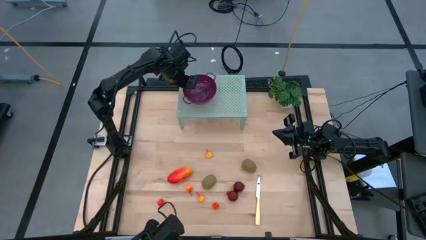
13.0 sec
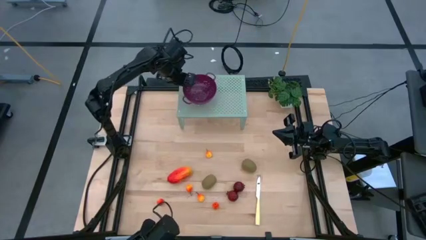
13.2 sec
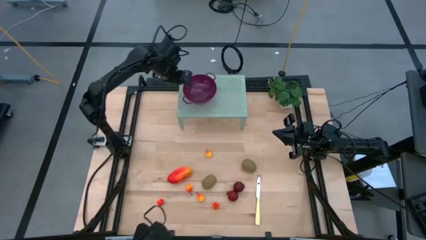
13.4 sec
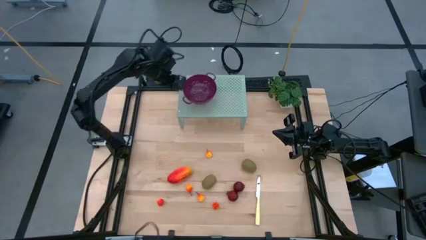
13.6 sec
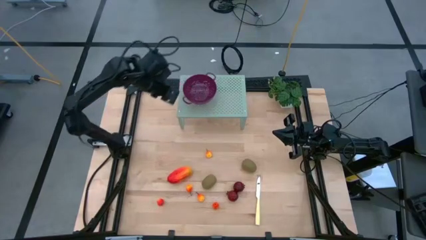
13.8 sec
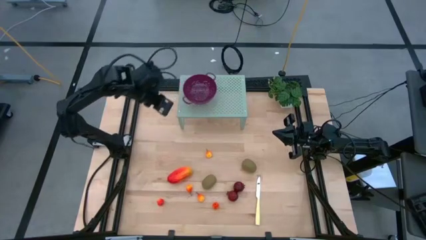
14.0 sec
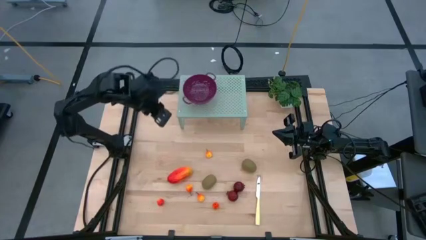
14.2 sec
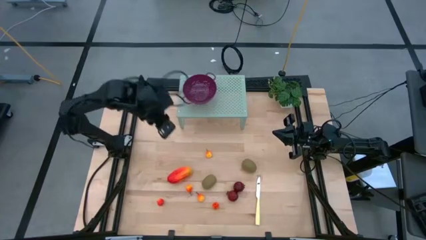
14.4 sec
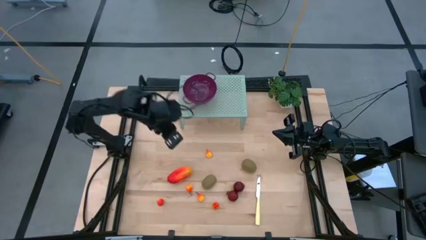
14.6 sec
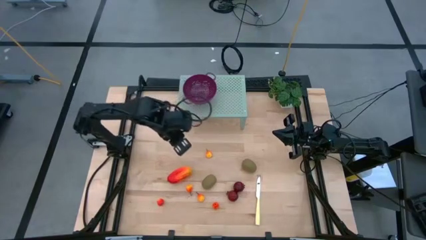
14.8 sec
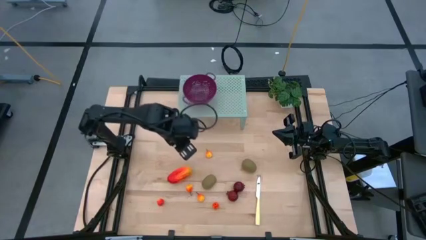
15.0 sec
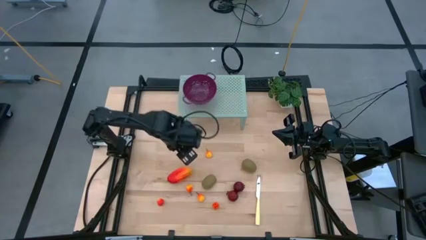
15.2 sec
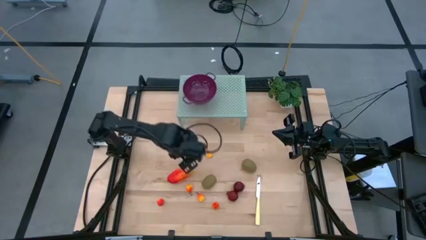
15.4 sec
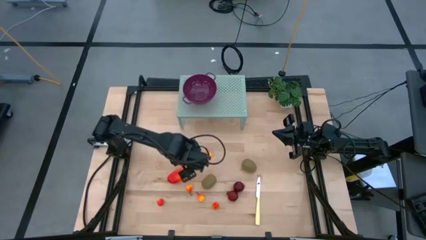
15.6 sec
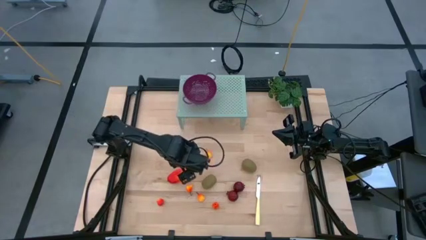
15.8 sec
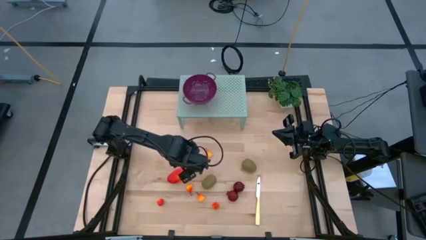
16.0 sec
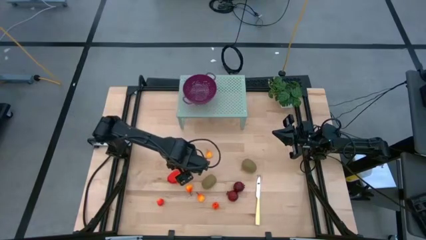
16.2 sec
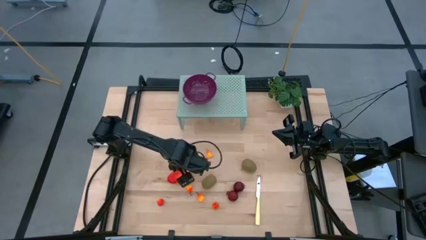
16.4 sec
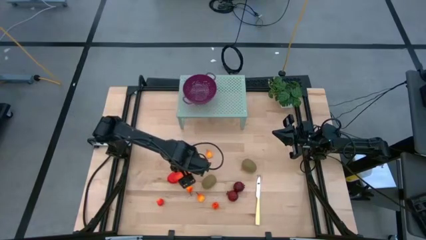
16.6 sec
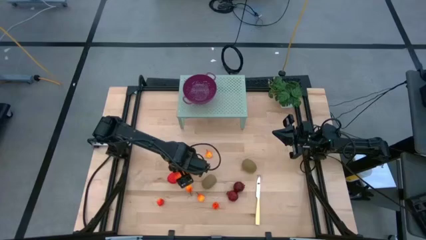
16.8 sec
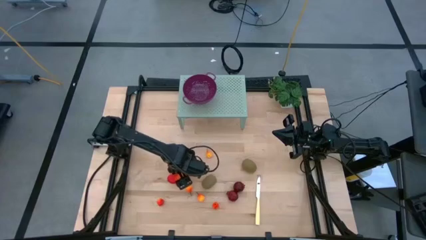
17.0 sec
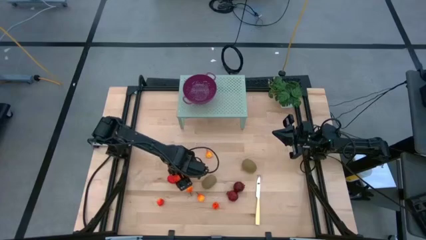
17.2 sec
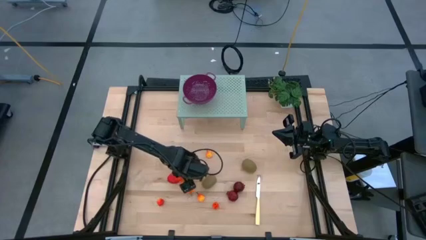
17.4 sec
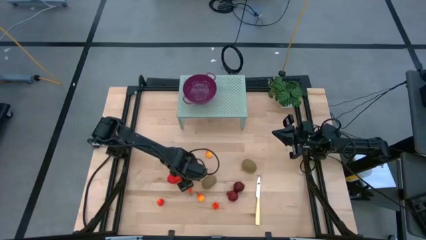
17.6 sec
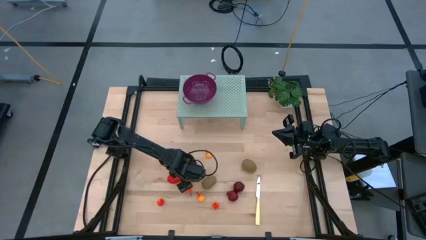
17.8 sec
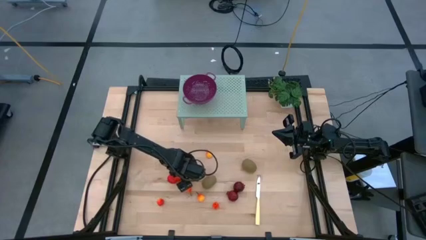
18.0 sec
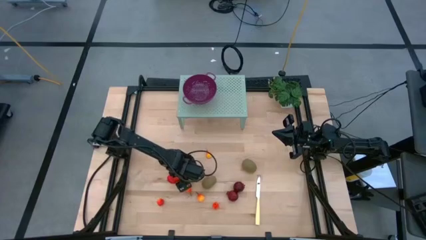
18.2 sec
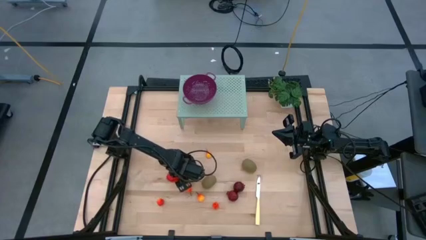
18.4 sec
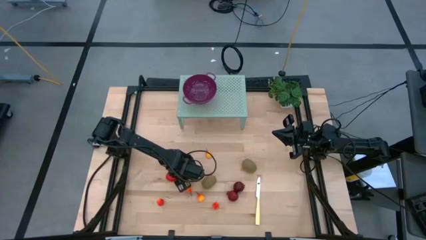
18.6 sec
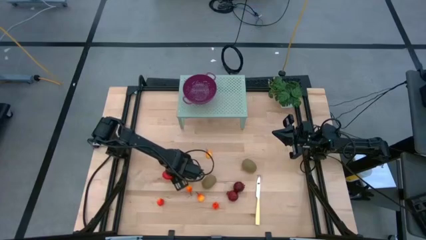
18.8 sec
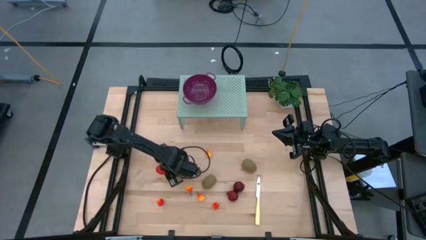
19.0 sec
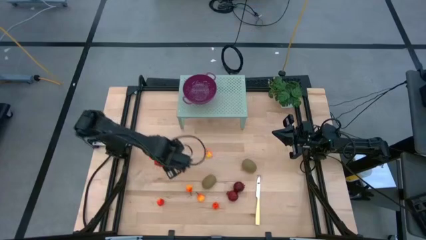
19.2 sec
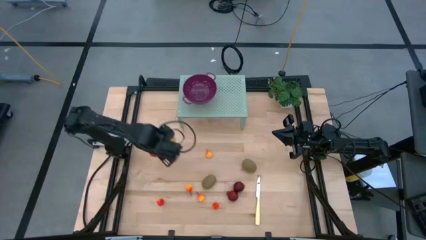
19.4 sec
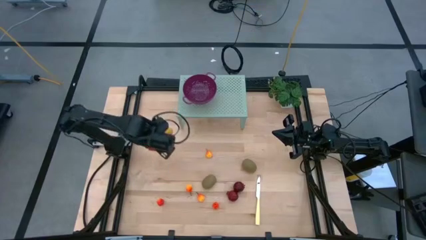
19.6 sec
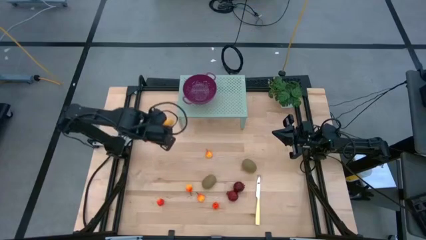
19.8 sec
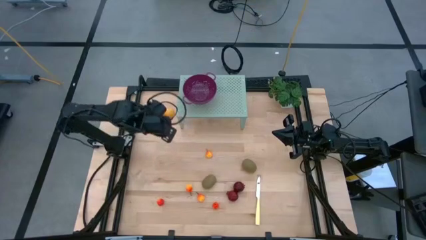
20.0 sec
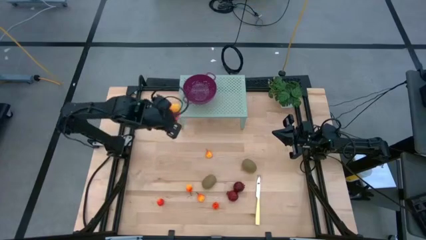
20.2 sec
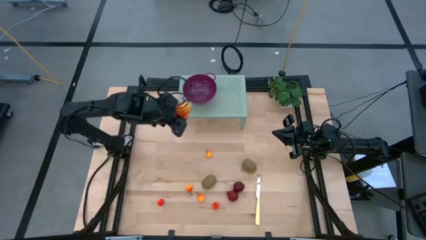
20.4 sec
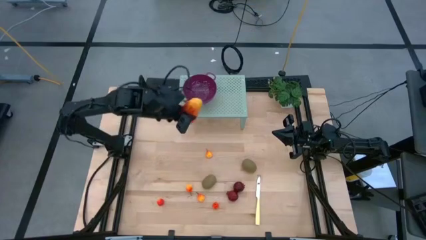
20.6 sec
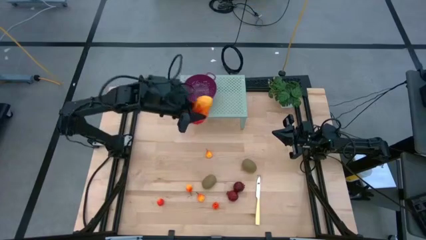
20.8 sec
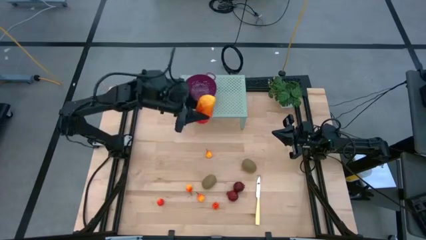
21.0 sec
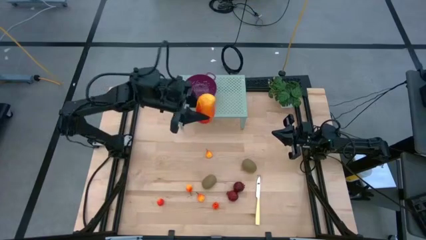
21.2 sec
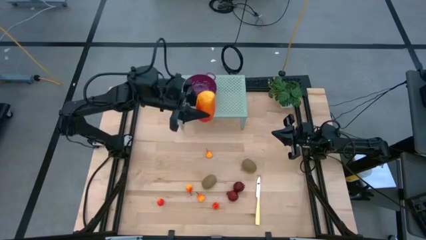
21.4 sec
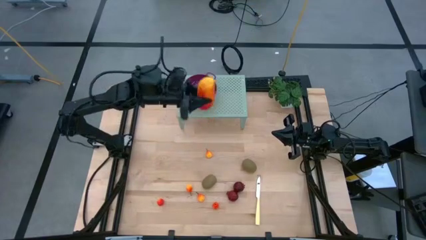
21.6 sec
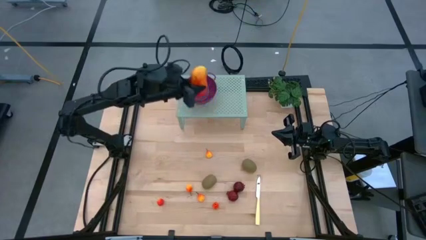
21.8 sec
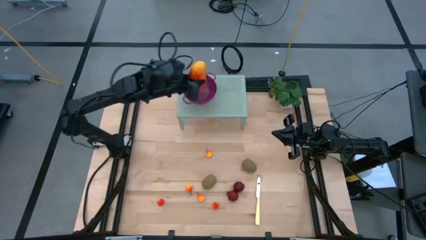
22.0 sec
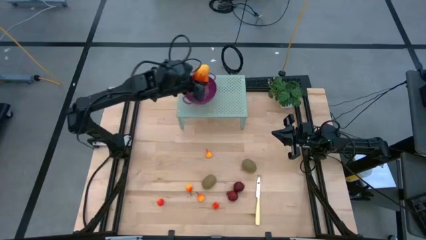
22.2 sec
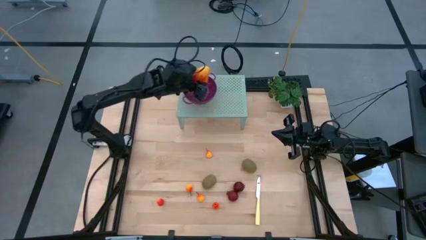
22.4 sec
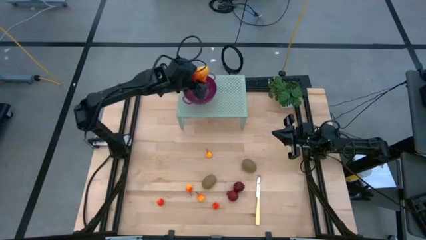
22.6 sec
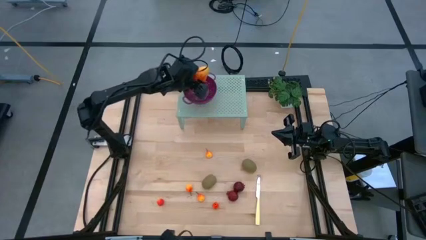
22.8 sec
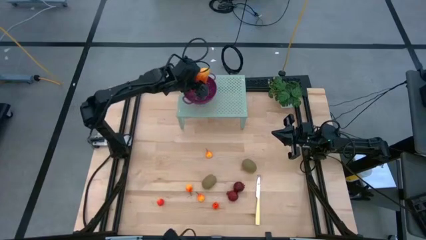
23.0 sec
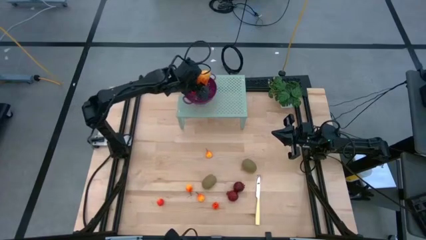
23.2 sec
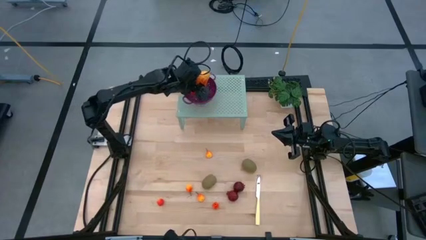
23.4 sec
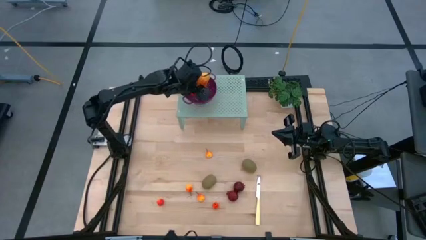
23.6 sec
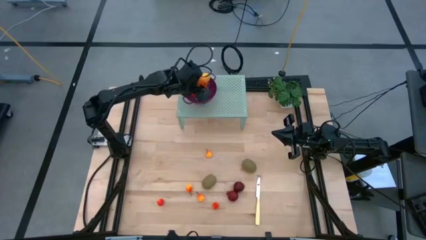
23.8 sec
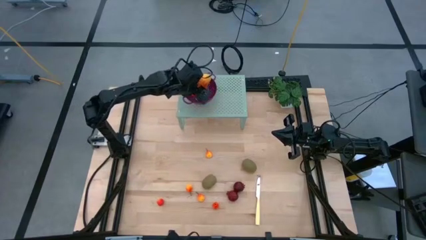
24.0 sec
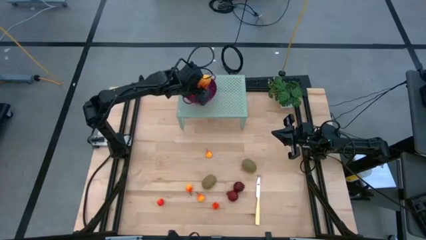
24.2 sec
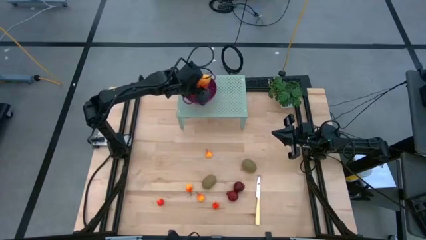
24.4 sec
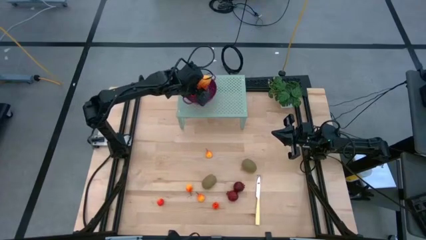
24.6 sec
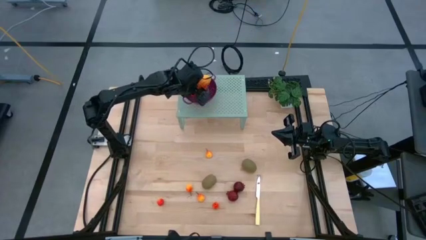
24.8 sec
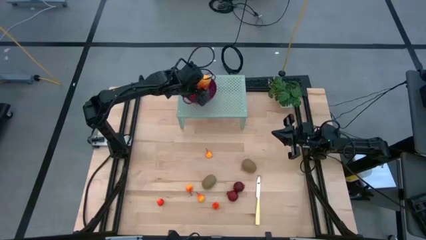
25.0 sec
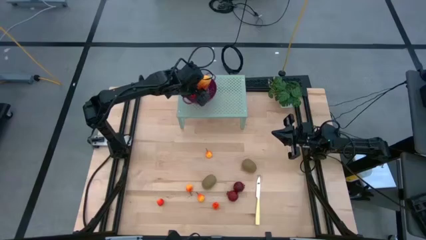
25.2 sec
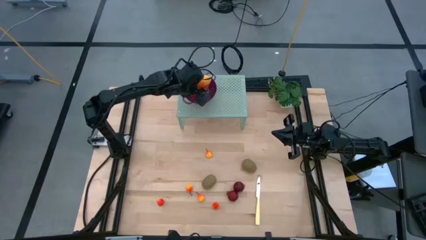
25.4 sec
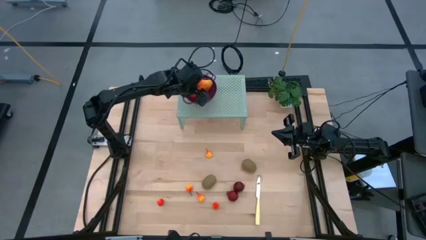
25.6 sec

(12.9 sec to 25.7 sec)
Task: Pick & Place Fruit
Put the orange mango in the red strainer bowl on the shelf
